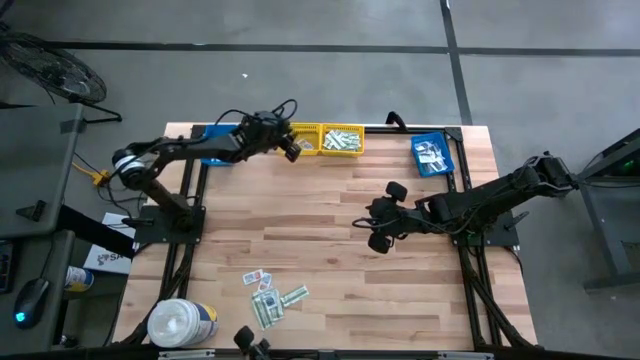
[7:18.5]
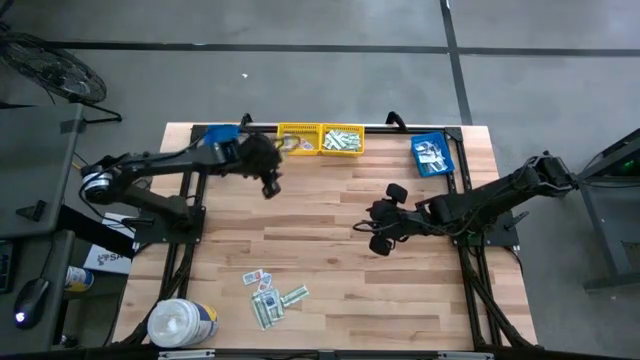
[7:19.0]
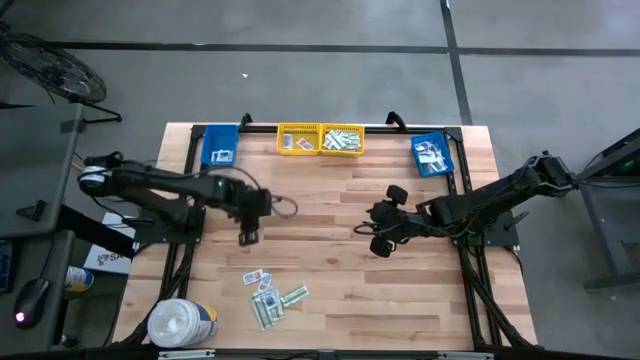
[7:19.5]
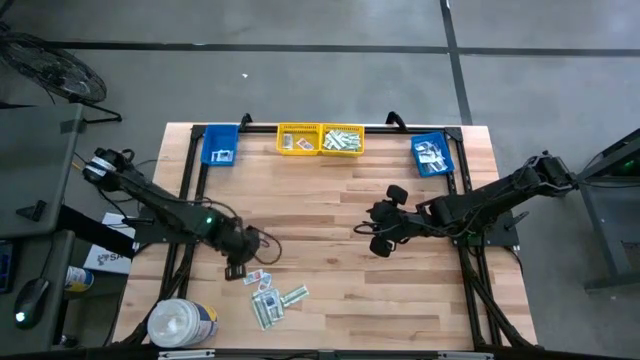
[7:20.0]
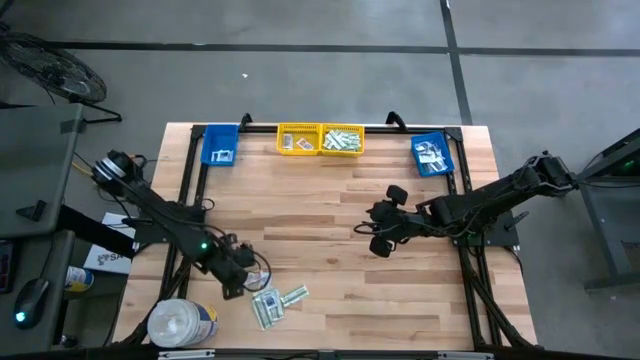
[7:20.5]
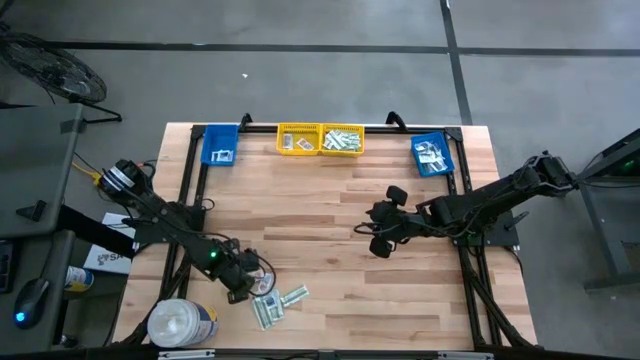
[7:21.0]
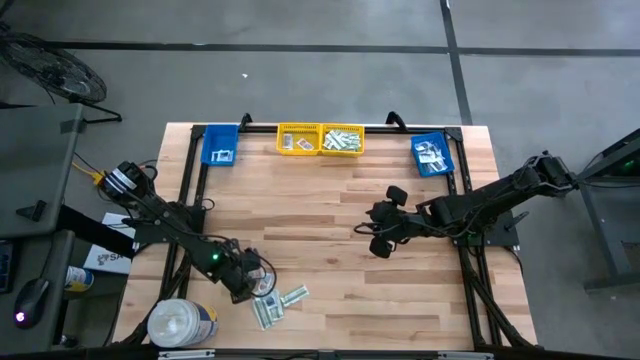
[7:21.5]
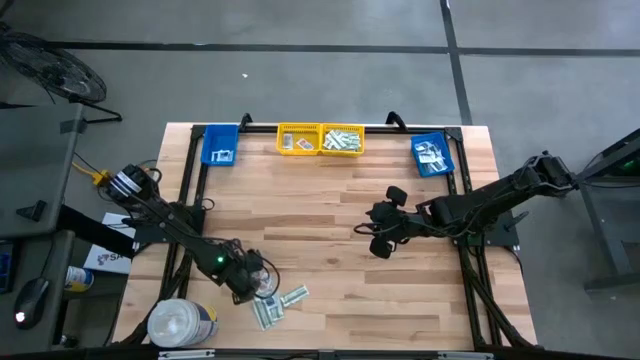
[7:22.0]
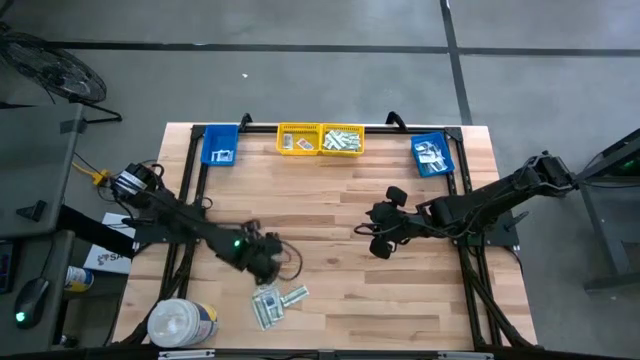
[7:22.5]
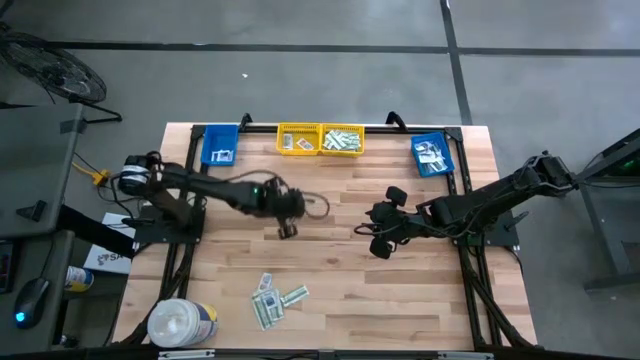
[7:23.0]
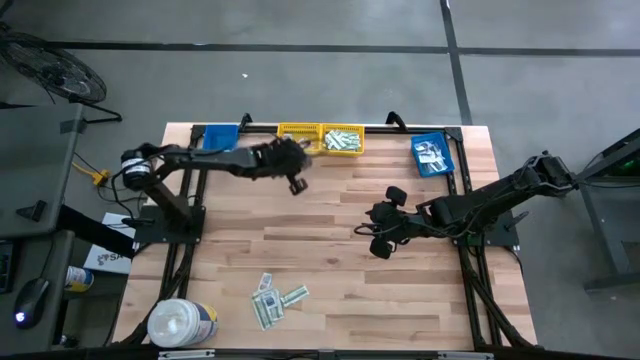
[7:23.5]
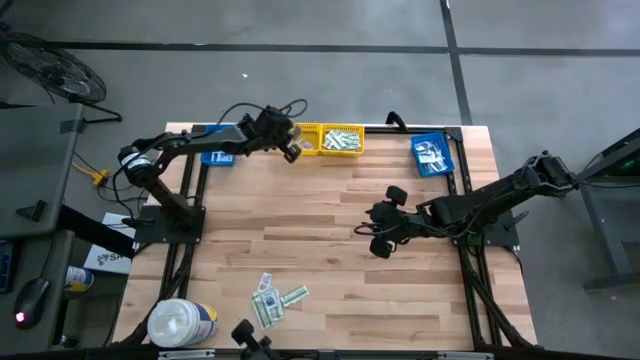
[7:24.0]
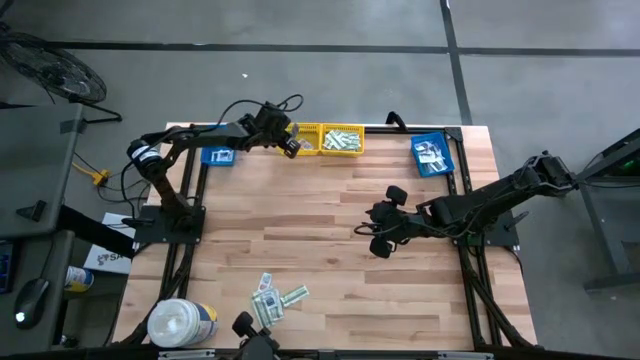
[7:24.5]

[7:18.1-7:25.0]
Task: Pick & Place First Aid Supplies
Put the orange ointment pack into the left yellow bin

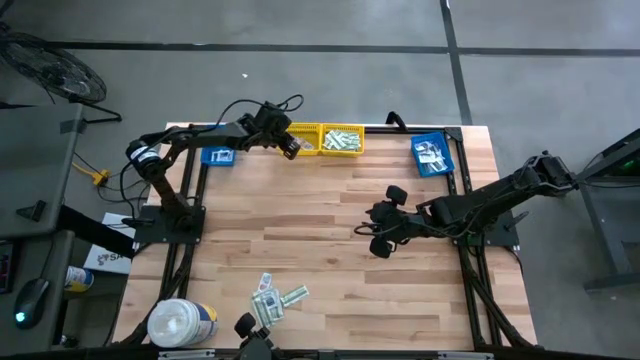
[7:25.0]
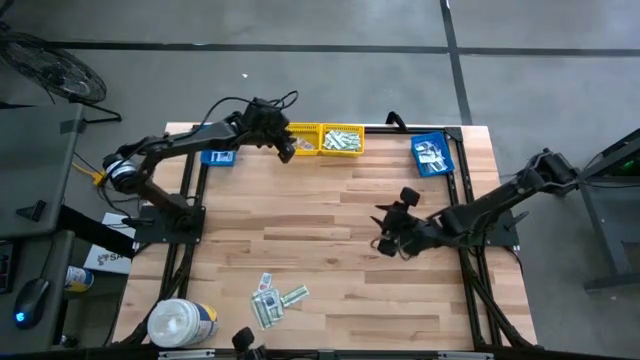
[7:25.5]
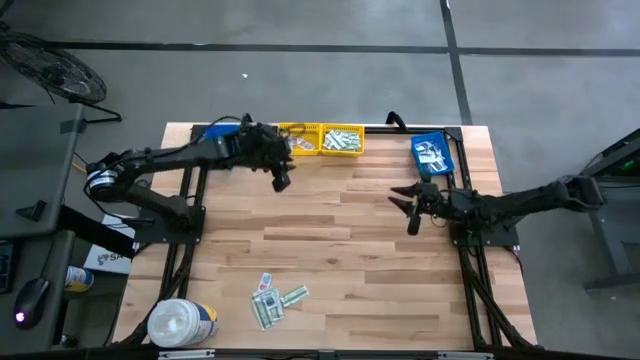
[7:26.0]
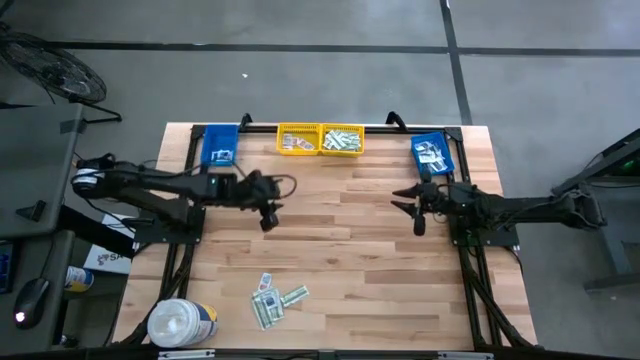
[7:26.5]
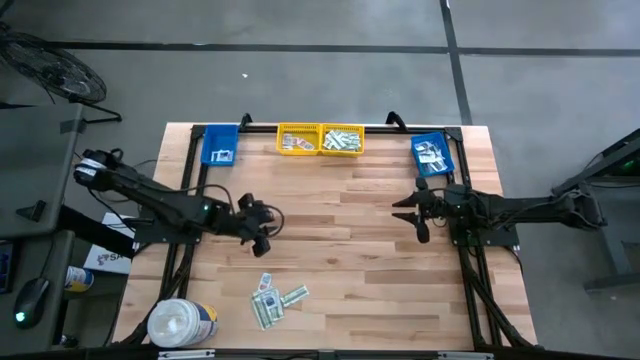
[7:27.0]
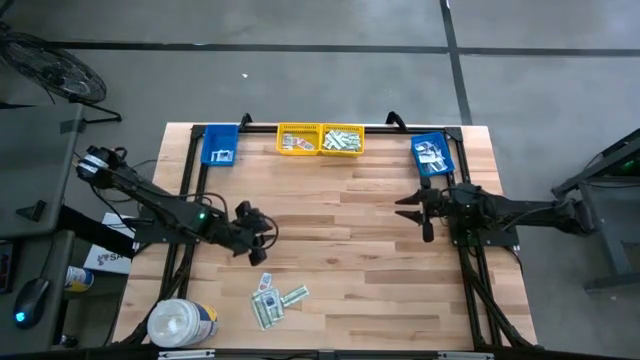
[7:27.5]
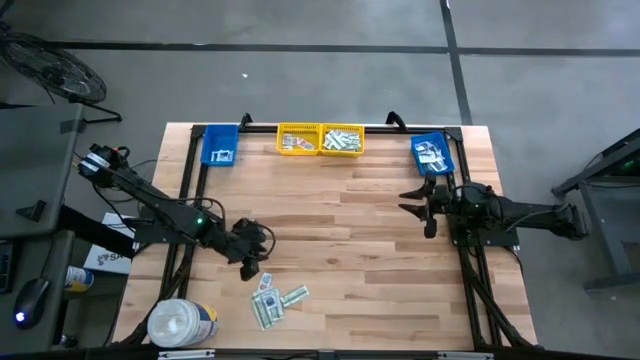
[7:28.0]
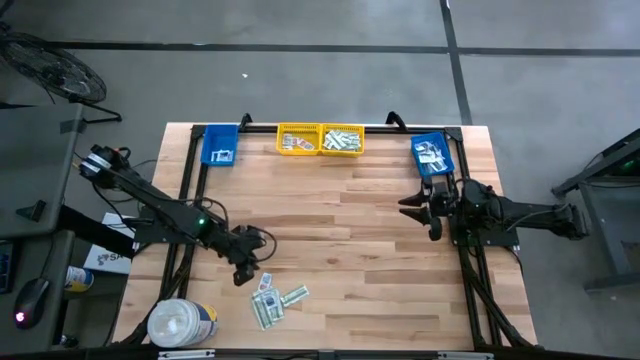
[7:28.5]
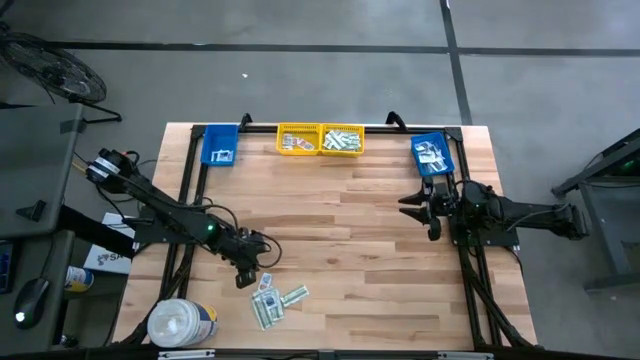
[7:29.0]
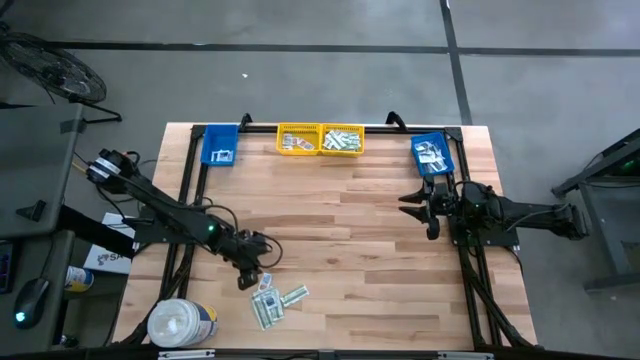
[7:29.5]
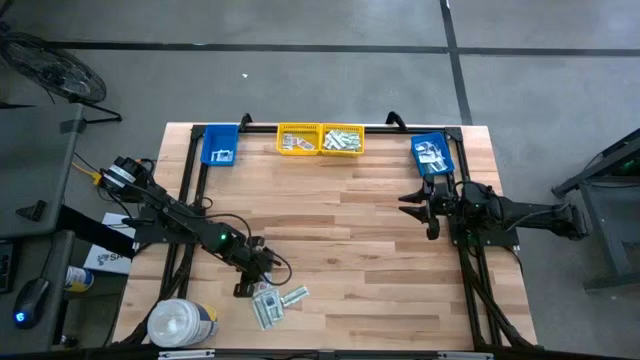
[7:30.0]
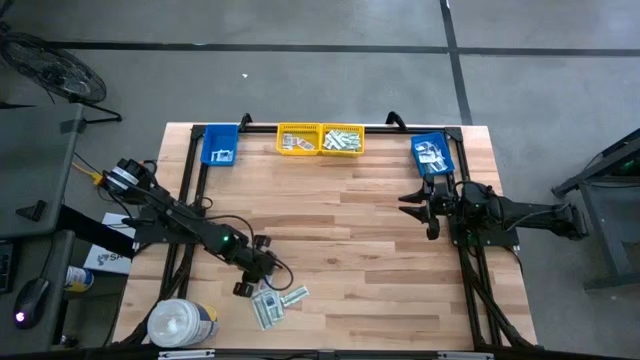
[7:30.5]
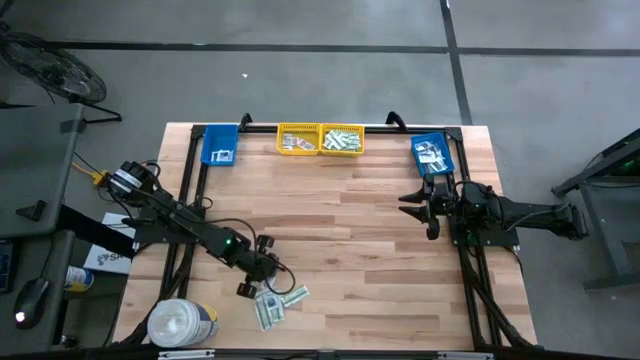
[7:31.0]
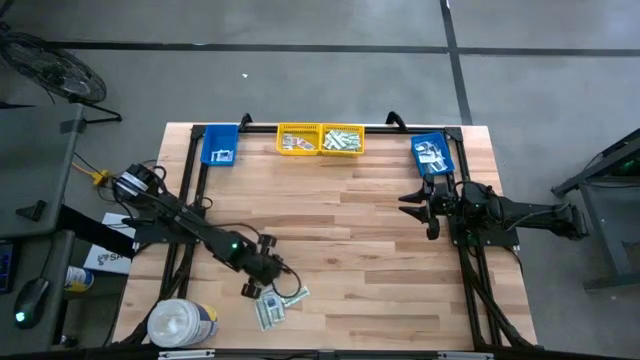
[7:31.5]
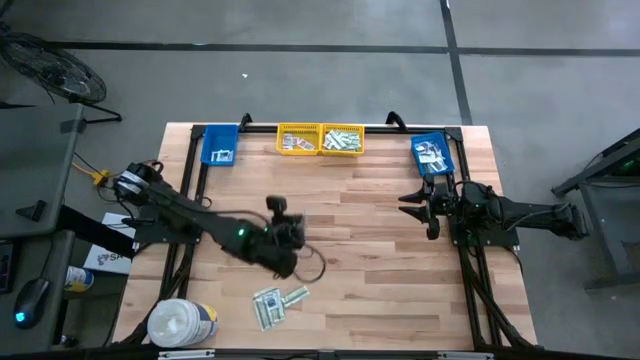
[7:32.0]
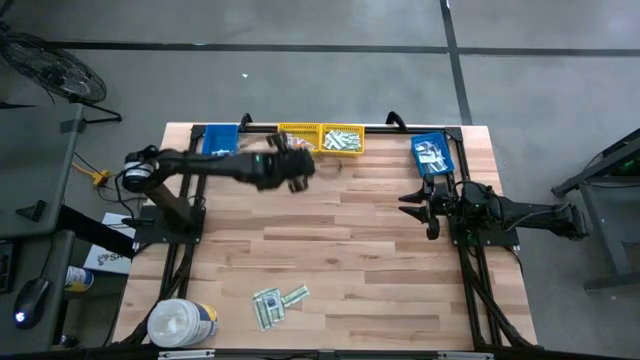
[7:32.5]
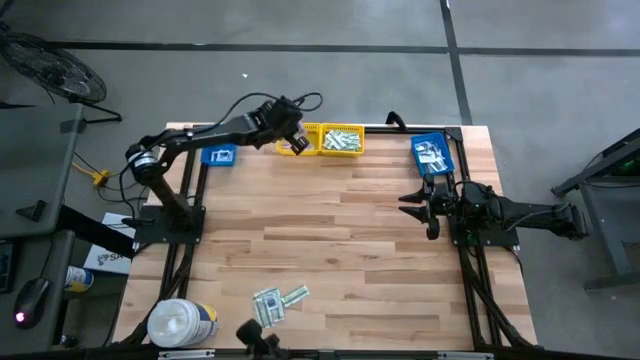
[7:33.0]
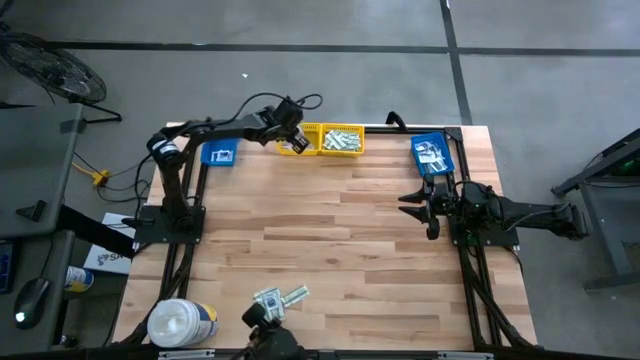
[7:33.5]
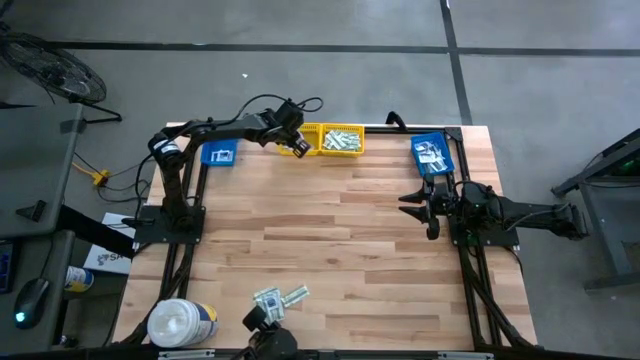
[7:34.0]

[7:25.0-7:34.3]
Put the orange ointment pack into the left yellow bin

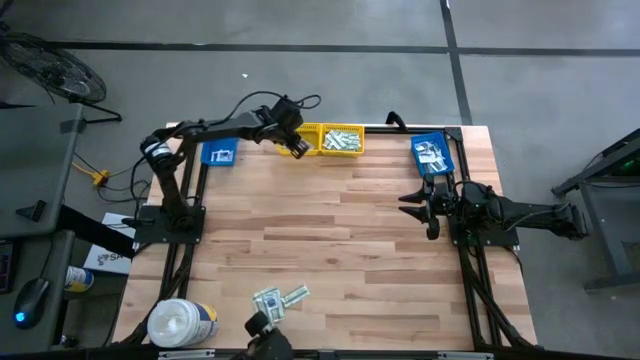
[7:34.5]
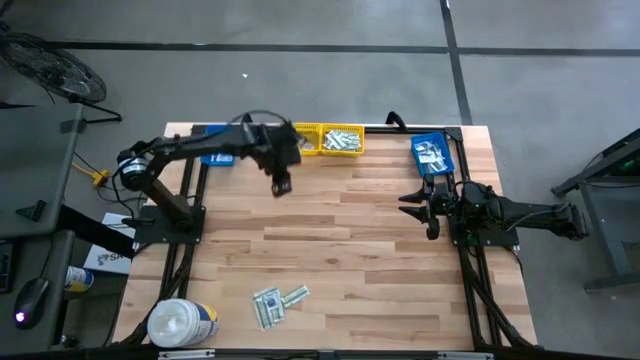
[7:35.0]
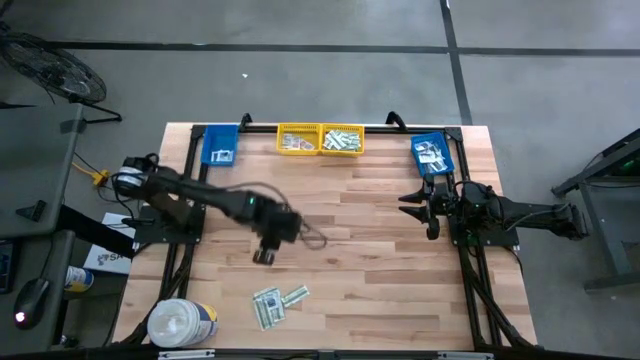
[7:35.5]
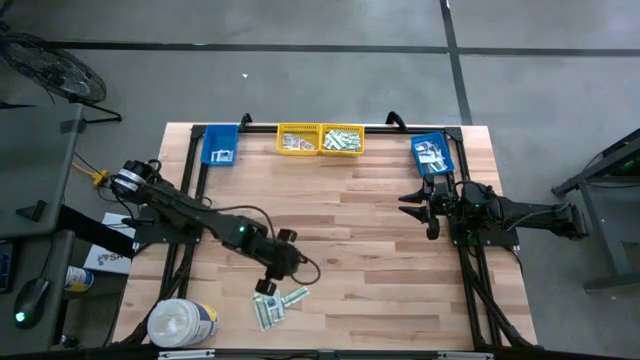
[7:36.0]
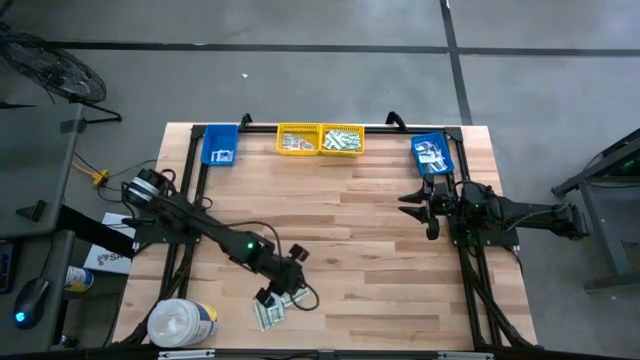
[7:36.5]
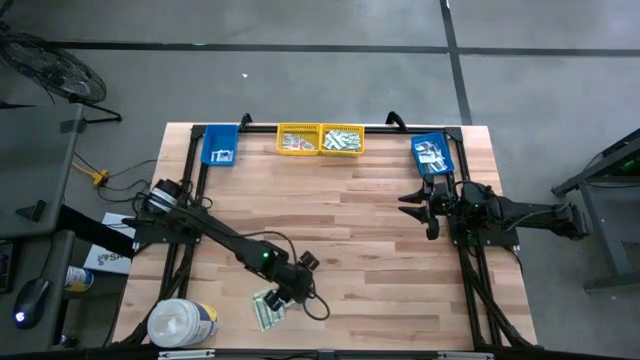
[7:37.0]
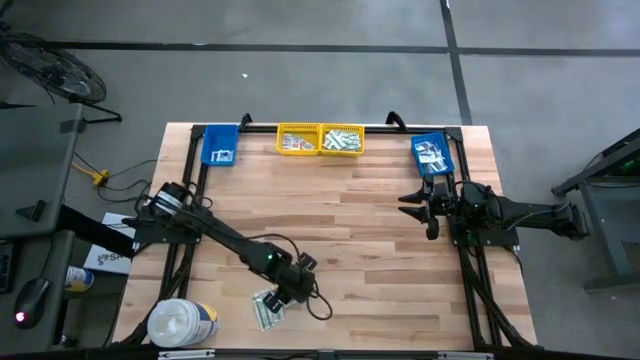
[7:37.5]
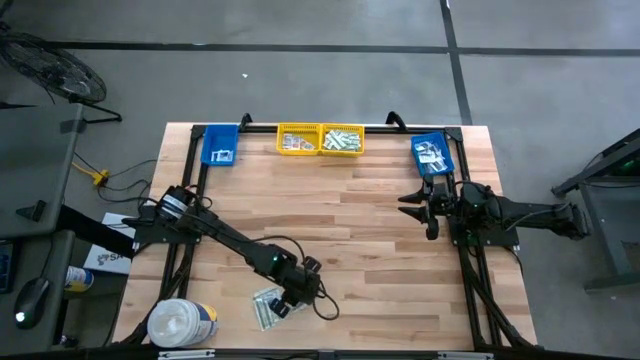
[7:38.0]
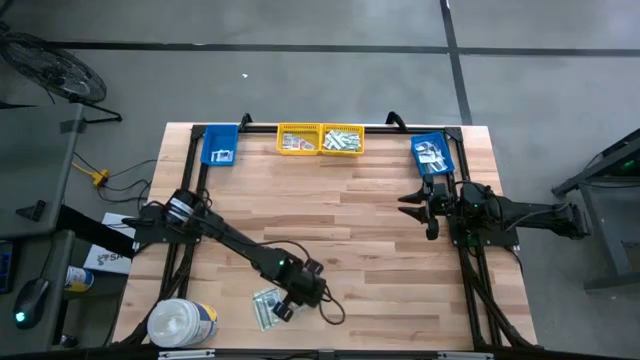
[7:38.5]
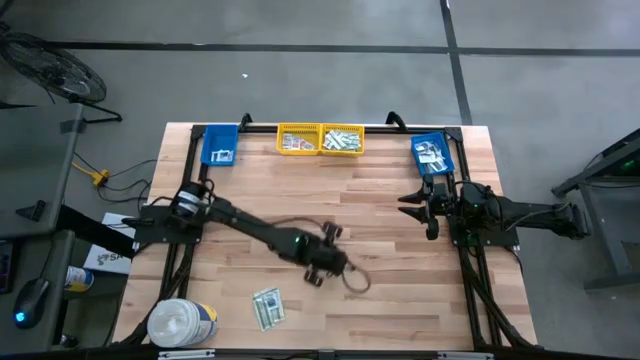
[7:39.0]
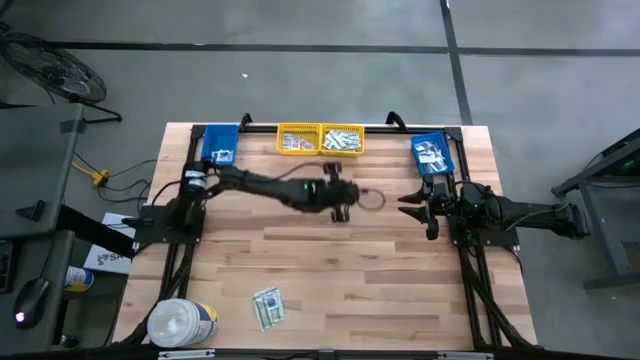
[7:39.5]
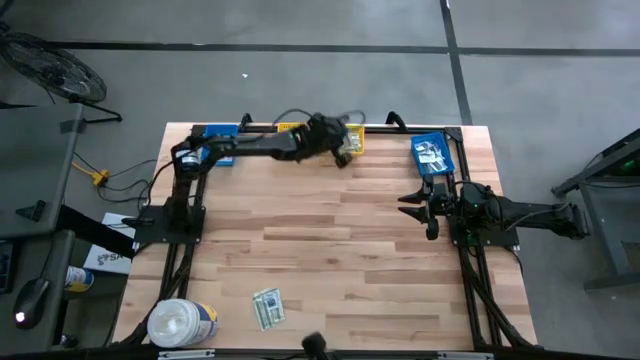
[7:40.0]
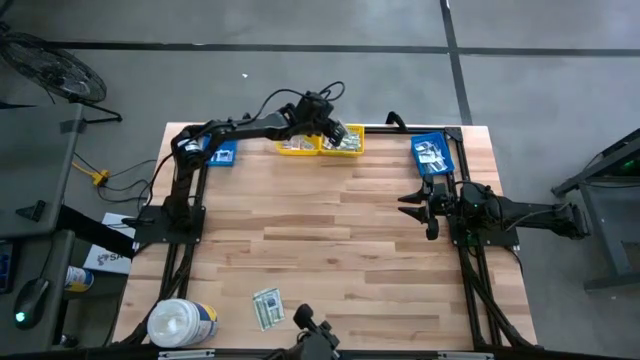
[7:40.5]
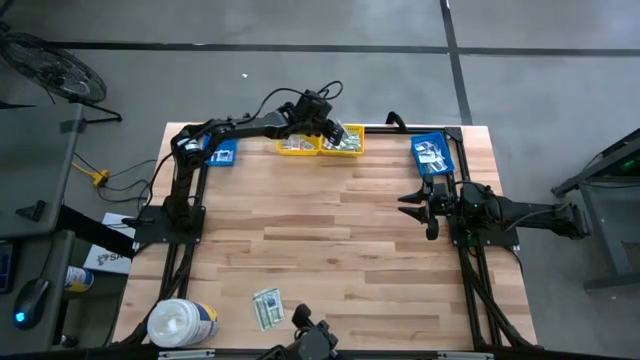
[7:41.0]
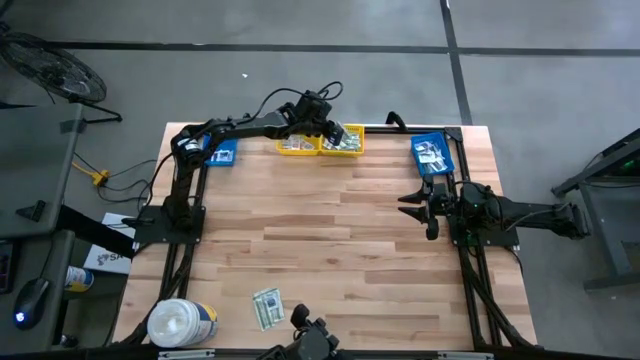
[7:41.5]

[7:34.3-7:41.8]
Put the green bandage pack into the right yellow bin
